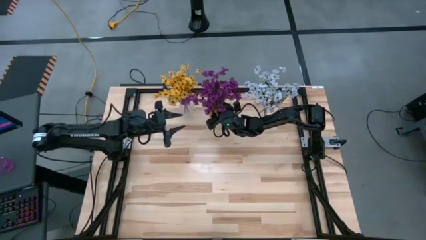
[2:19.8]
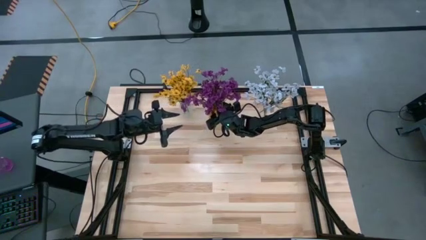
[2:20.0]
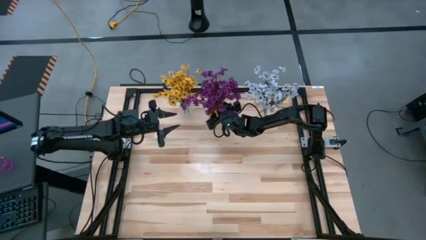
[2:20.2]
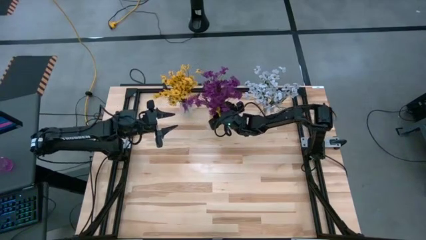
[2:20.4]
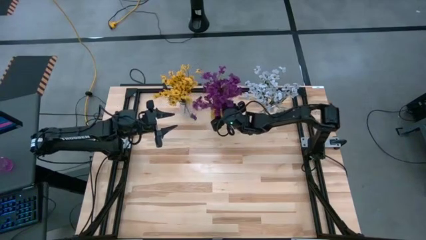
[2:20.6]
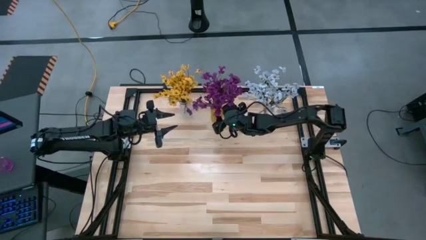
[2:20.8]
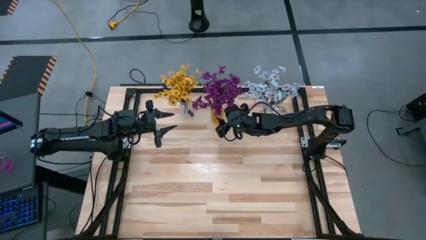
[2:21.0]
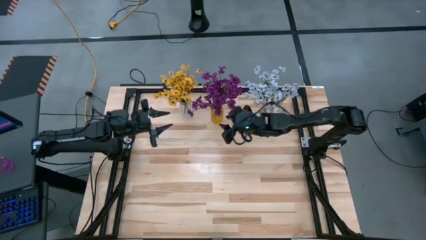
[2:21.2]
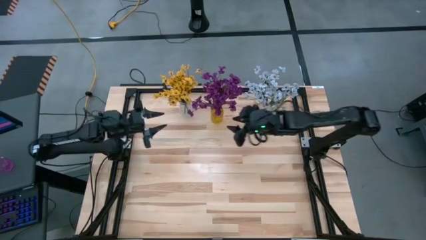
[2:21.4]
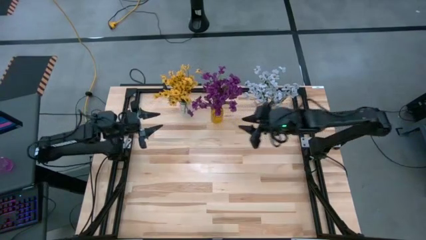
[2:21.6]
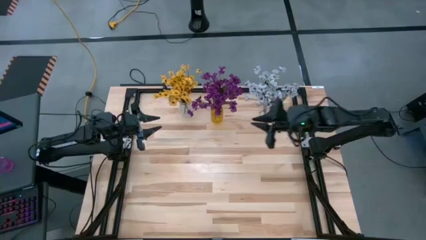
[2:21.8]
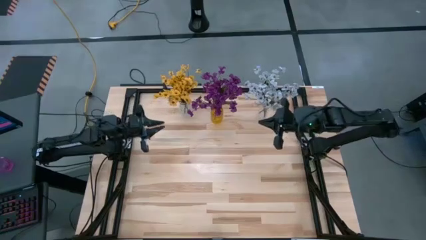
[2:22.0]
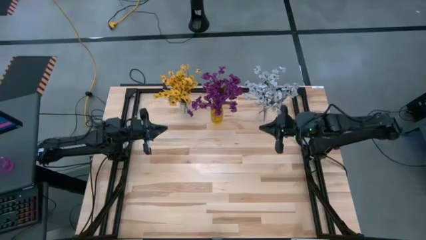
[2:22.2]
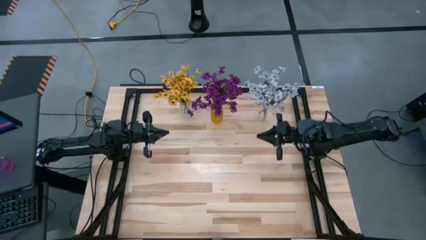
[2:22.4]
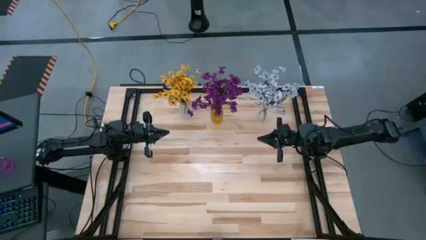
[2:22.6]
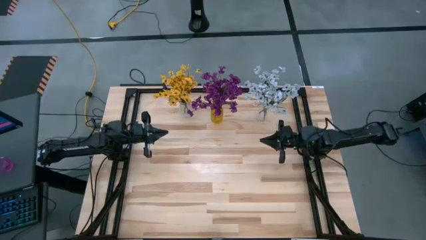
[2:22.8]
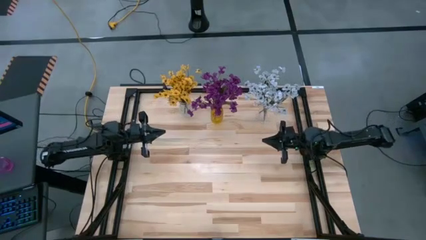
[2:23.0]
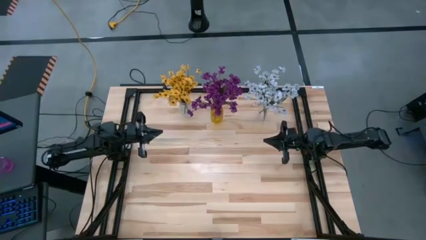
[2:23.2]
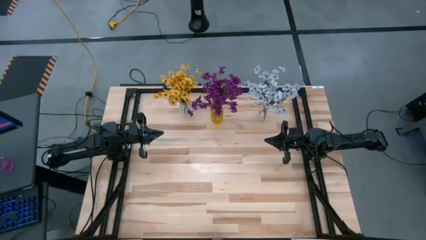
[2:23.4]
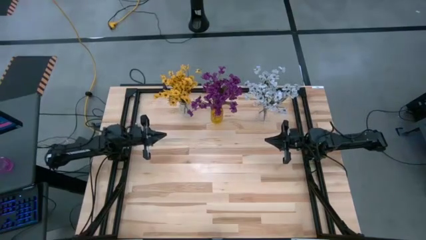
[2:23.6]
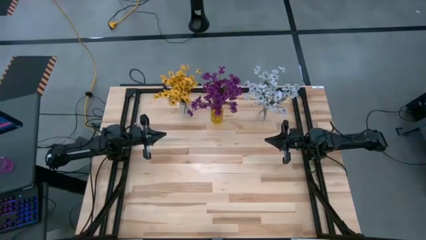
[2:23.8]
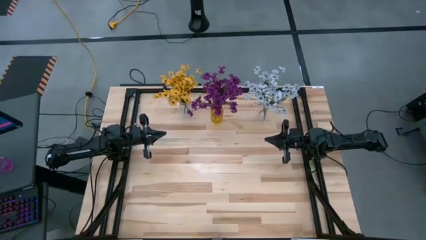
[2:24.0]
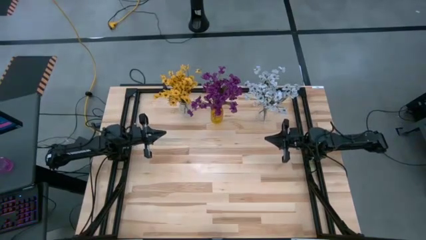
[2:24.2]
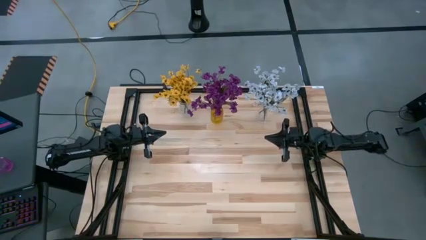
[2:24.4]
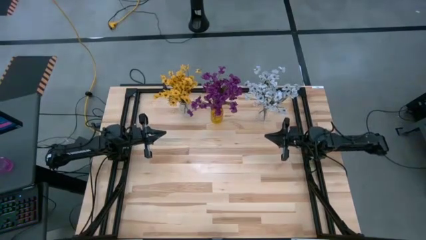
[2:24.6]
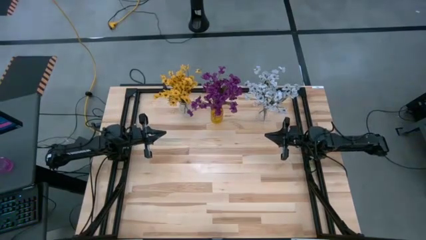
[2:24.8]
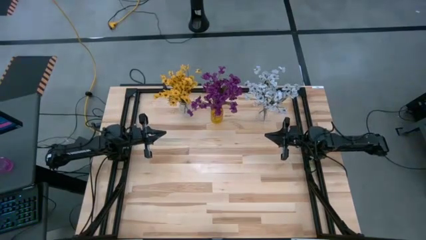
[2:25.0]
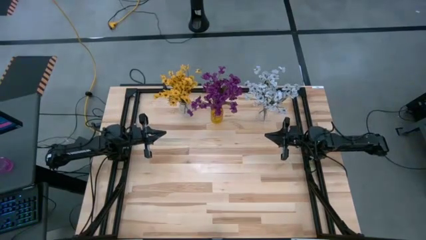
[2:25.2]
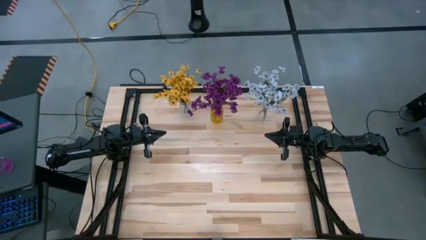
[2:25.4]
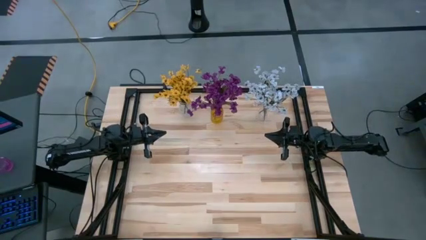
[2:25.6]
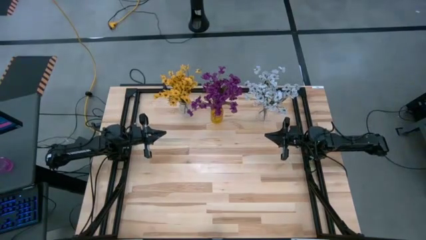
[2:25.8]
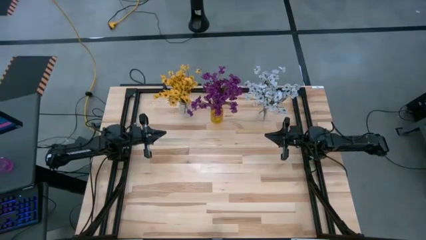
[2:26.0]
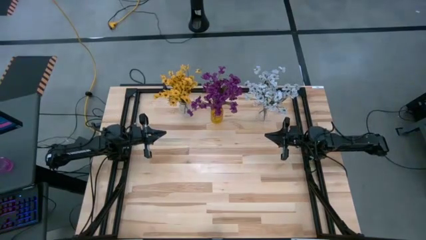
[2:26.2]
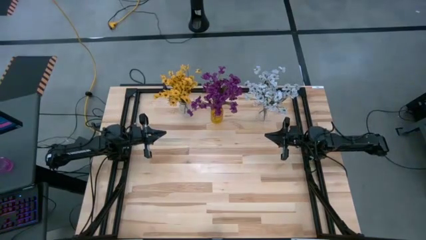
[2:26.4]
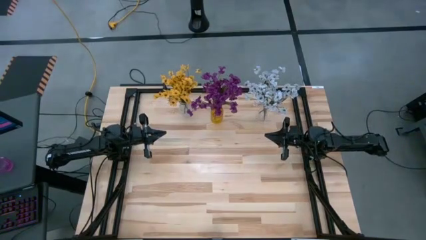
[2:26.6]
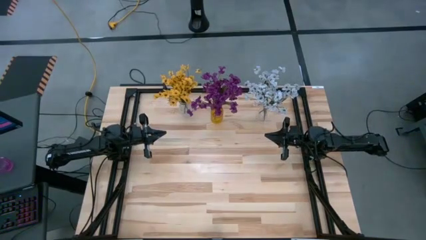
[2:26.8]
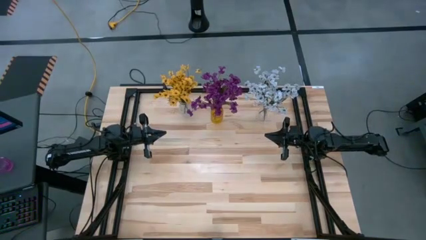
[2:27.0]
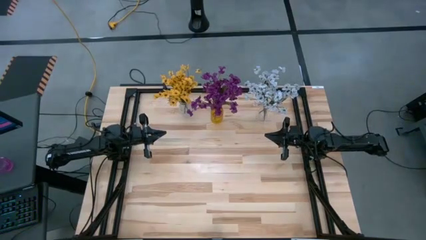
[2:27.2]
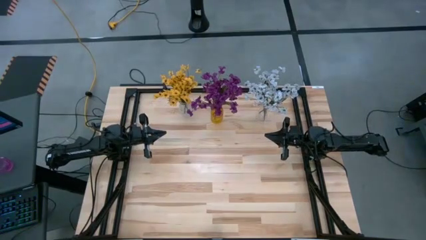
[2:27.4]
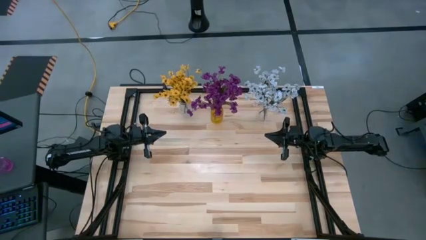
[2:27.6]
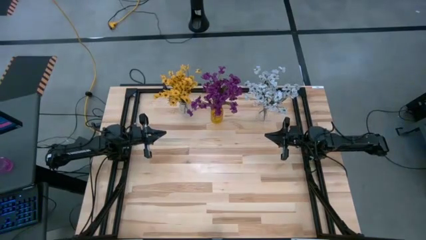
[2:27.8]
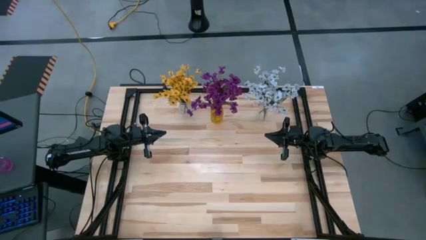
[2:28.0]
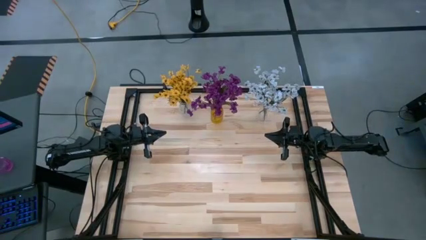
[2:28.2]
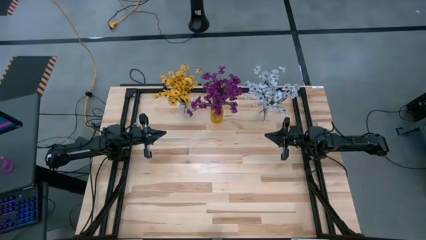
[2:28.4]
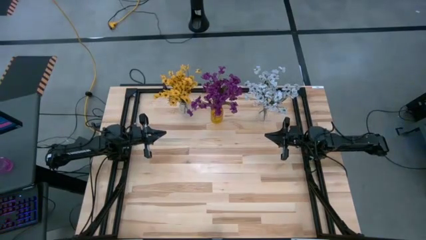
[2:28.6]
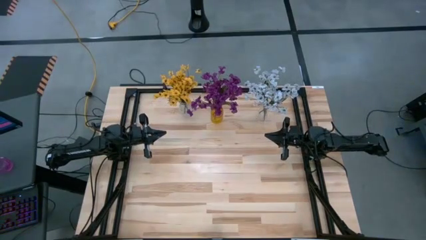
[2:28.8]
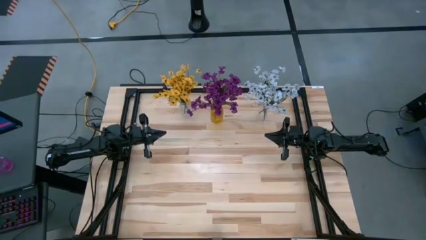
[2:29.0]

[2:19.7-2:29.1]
Task: Sort flowers into vase by color
Return to Home Position

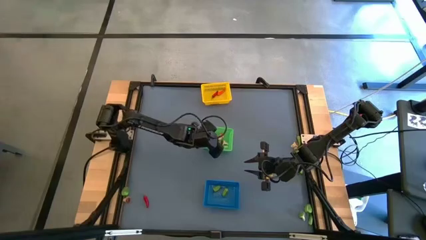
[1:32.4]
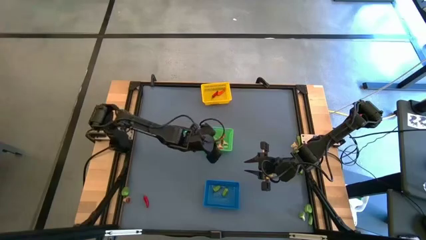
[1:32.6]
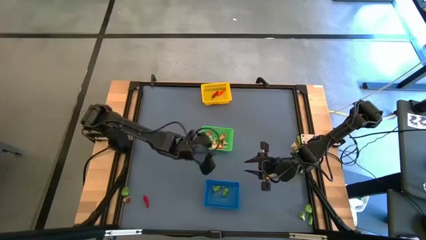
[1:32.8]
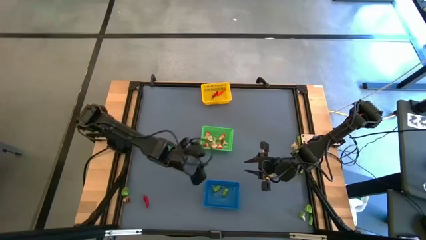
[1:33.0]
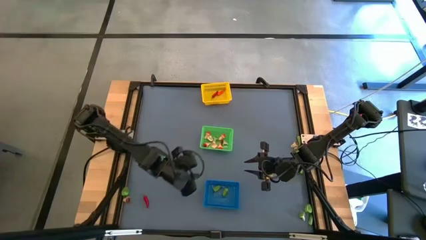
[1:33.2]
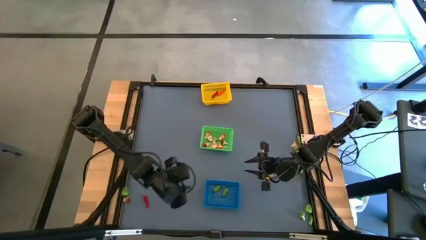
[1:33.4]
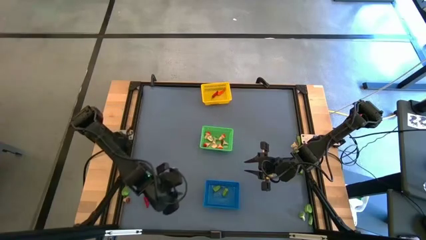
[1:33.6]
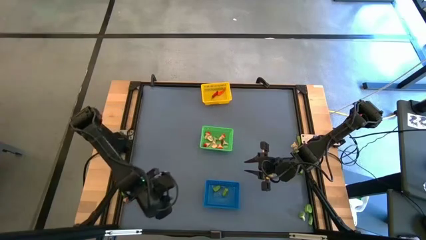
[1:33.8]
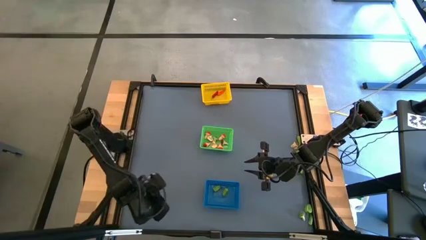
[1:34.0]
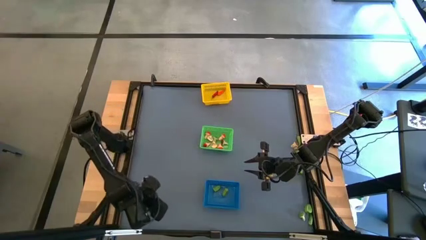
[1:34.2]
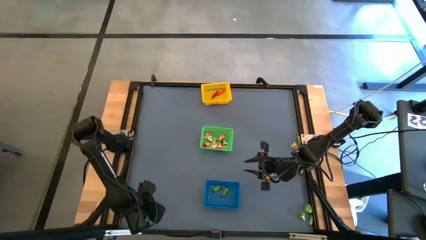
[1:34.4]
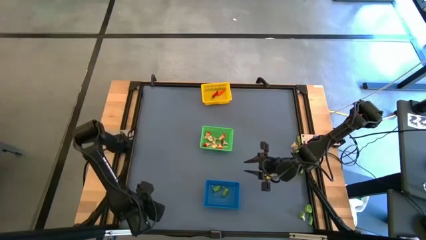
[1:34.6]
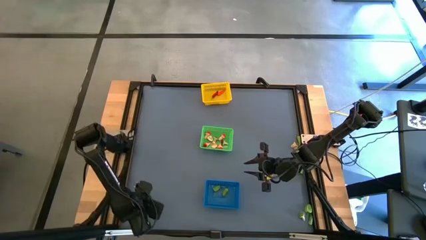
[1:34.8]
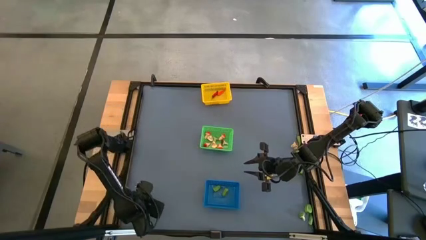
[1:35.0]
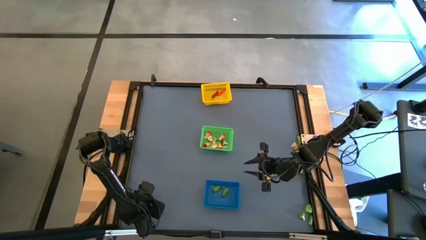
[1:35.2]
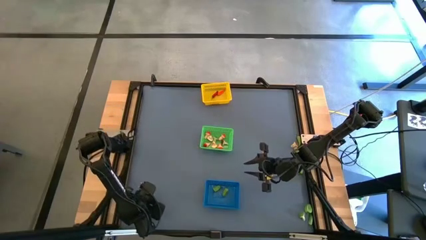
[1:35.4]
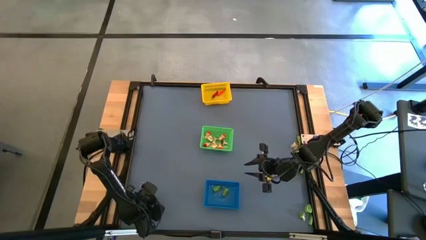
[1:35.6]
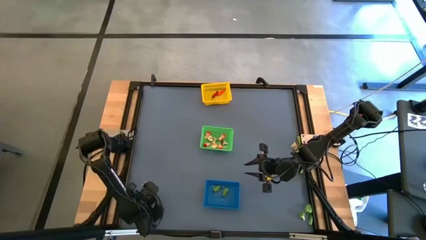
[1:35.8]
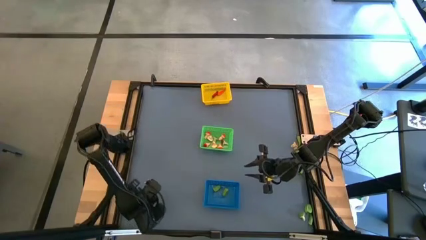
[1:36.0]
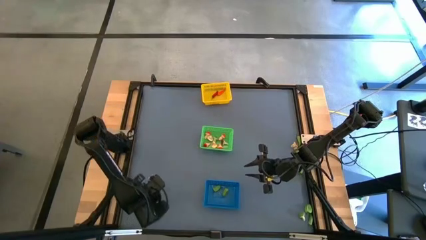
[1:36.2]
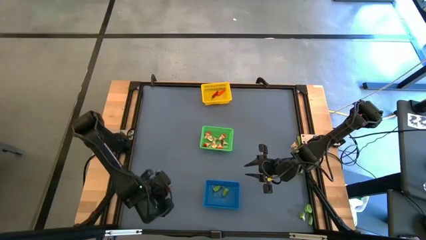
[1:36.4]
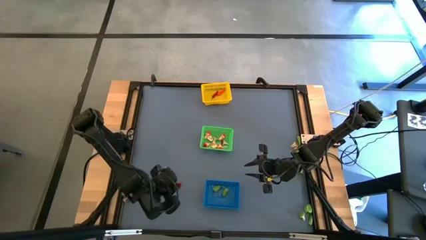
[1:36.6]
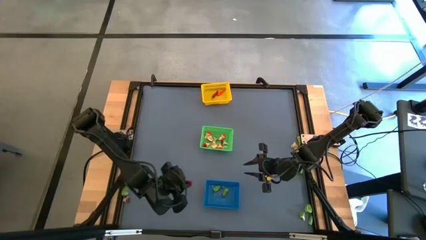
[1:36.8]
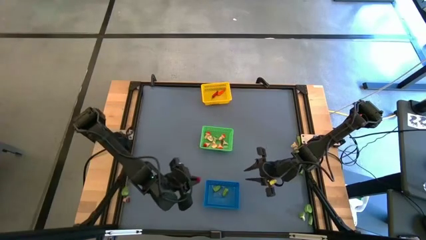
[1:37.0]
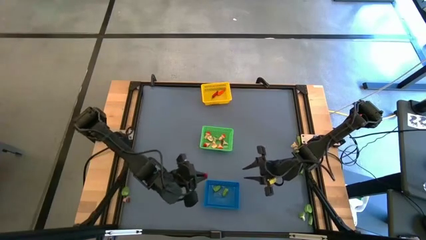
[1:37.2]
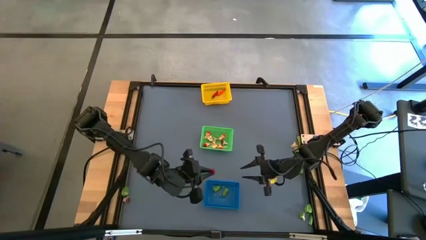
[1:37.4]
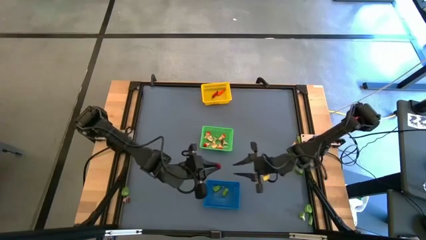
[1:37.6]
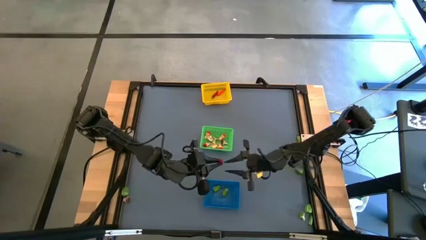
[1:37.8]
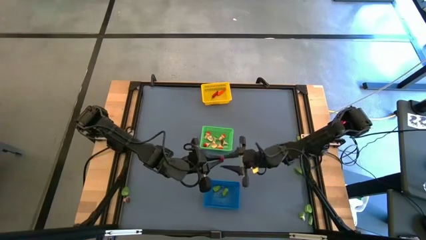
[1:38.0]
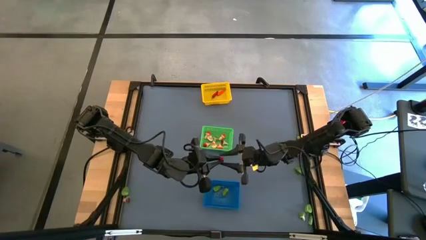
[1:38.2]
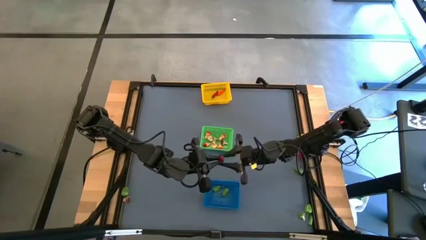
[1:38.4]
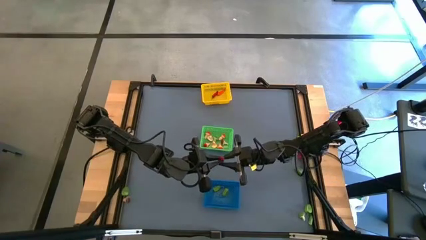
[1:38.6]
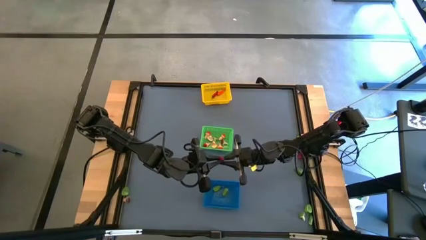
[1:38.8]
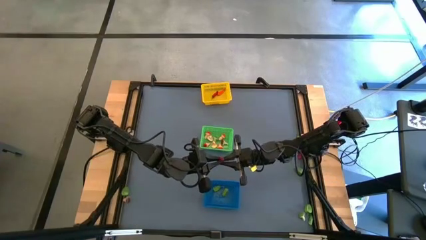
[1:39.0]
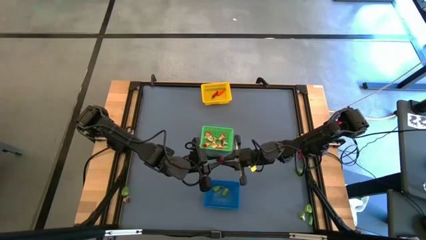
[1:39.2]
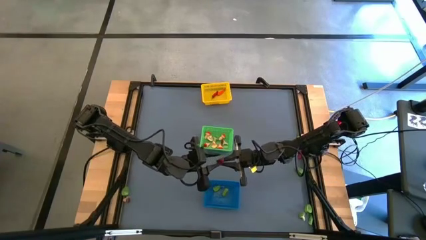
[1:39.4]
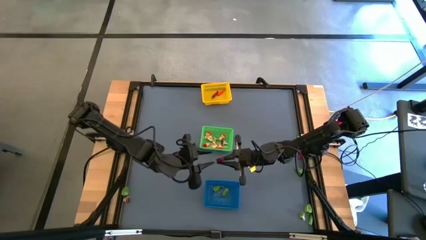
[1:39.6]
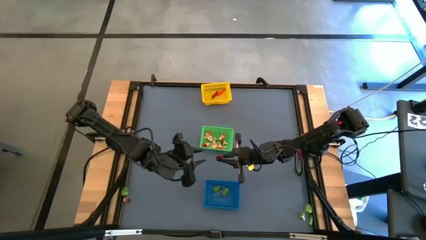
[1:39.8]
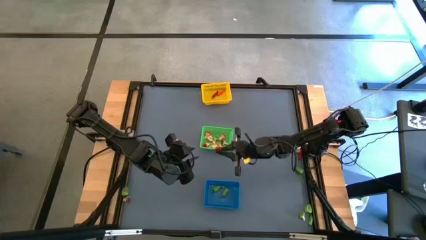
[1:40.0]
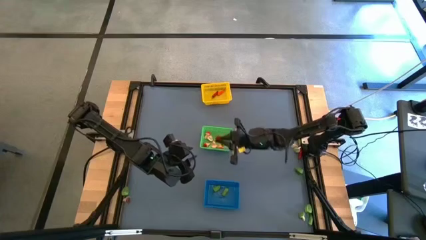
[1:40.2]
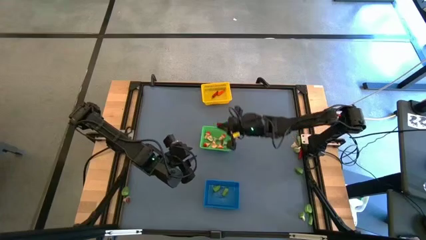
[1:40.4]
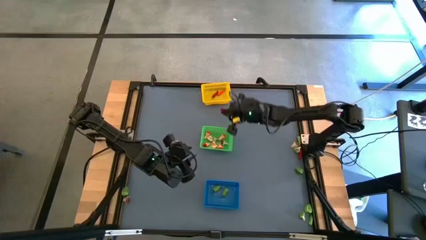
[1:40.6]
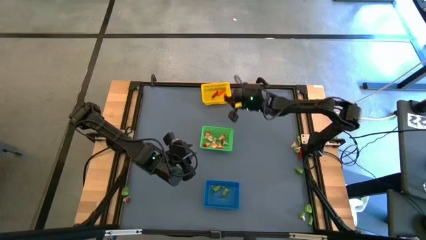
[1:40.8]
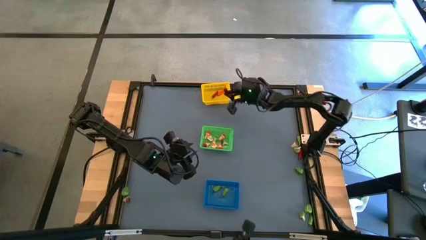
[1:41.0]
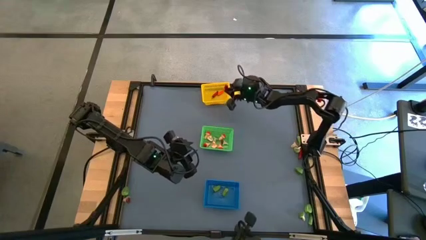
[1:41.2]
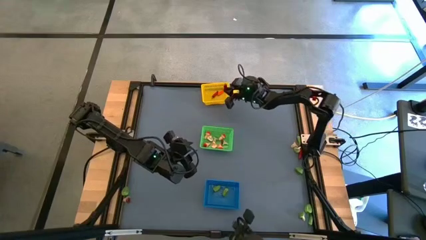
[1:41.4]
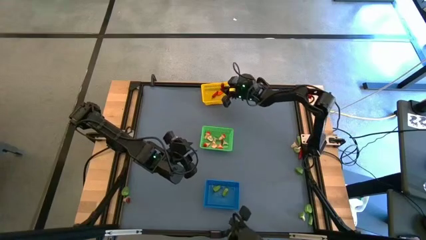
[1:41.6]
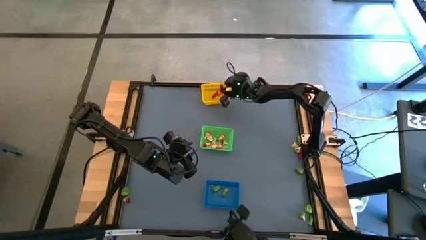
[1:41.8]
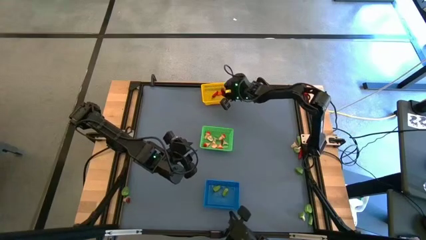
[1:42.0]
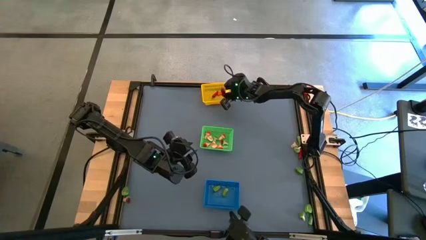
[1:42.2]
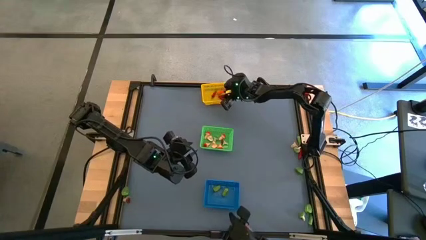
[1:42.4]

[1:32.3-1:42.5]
Task: Sort produce into baskets
Put the red chili pepper into the yellow bin
